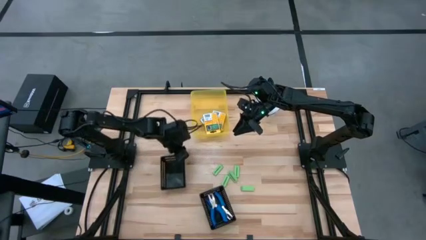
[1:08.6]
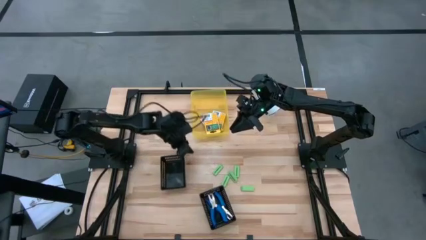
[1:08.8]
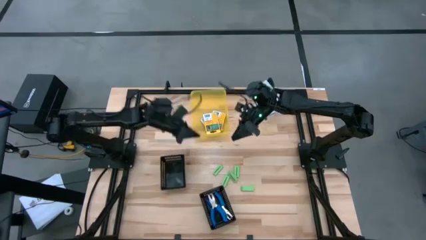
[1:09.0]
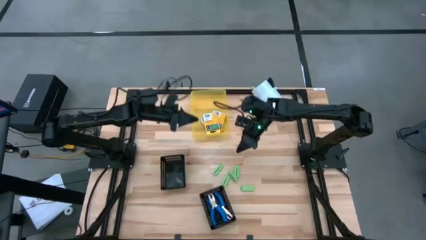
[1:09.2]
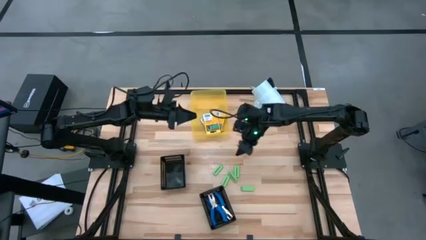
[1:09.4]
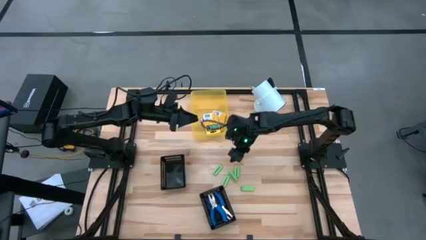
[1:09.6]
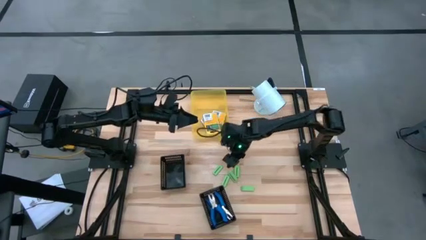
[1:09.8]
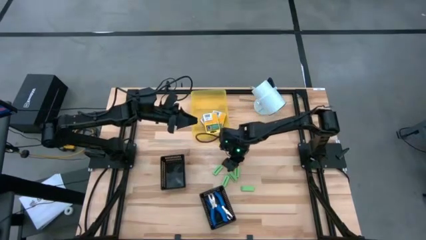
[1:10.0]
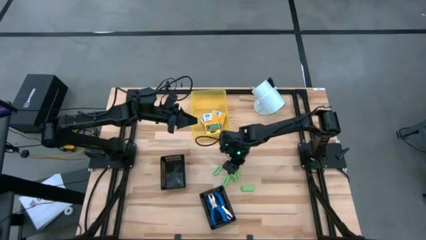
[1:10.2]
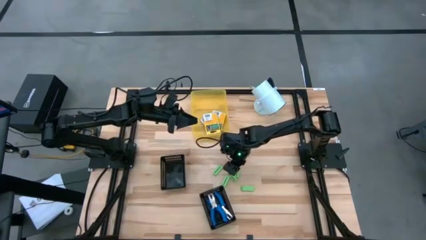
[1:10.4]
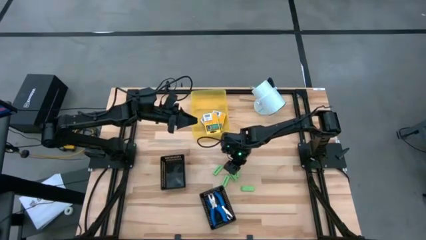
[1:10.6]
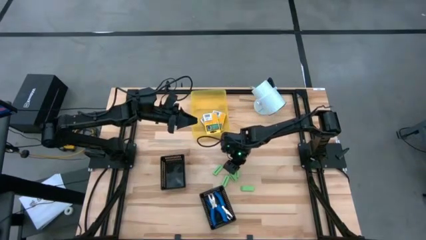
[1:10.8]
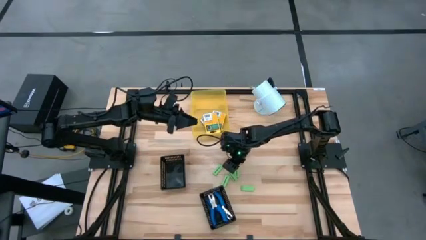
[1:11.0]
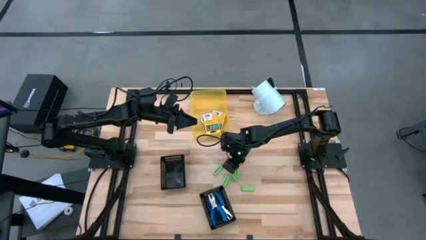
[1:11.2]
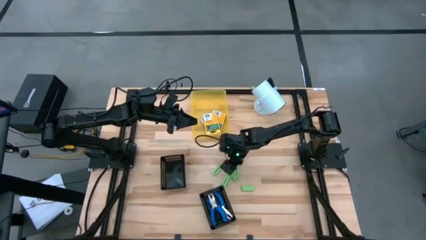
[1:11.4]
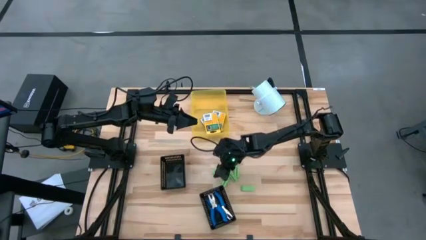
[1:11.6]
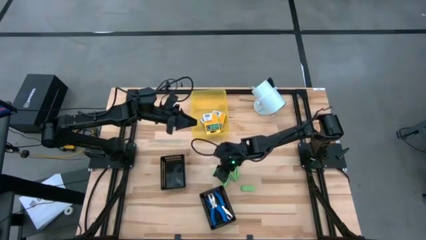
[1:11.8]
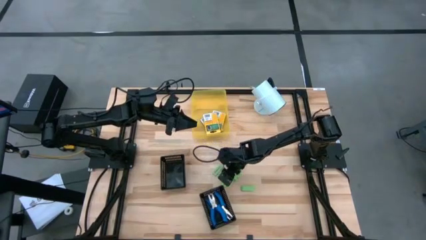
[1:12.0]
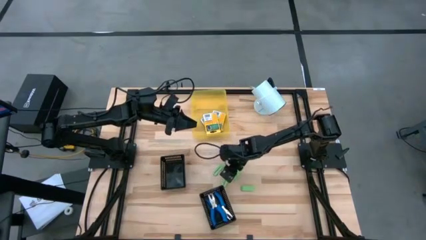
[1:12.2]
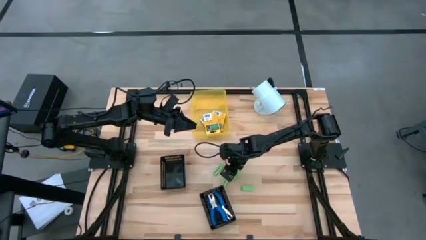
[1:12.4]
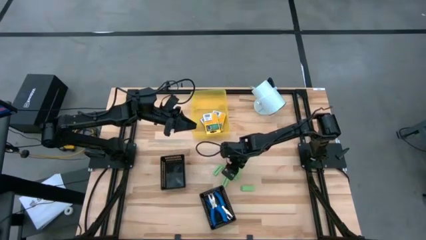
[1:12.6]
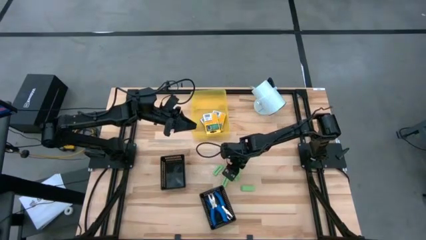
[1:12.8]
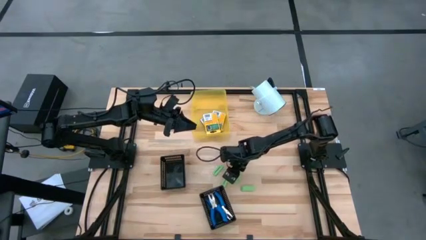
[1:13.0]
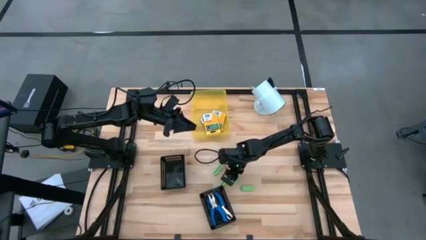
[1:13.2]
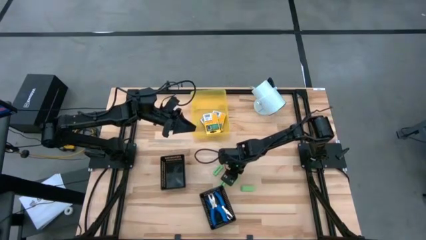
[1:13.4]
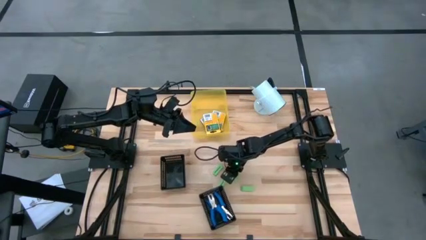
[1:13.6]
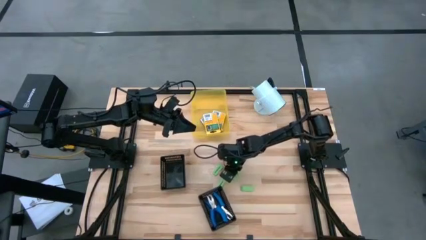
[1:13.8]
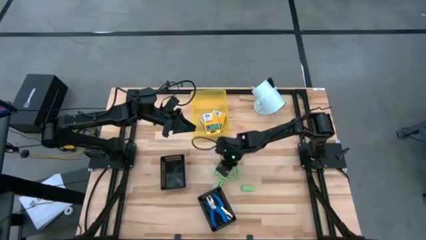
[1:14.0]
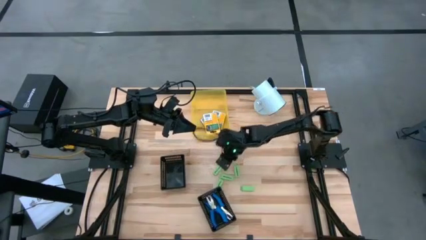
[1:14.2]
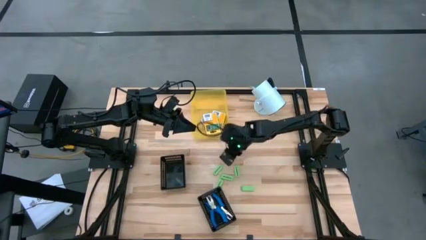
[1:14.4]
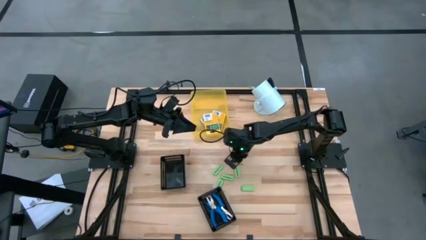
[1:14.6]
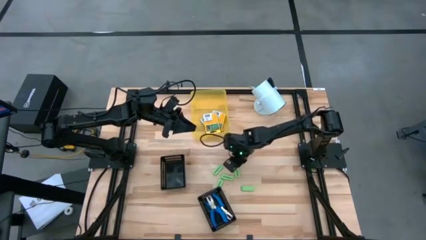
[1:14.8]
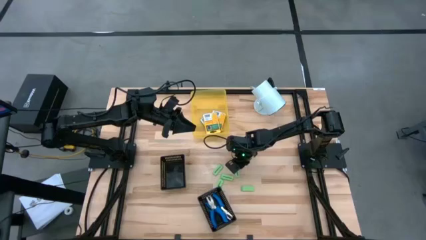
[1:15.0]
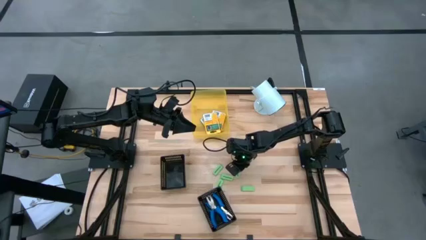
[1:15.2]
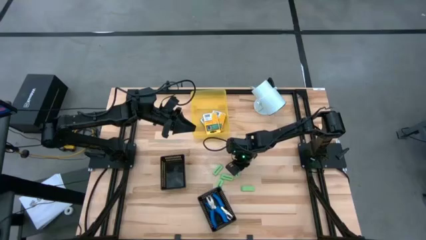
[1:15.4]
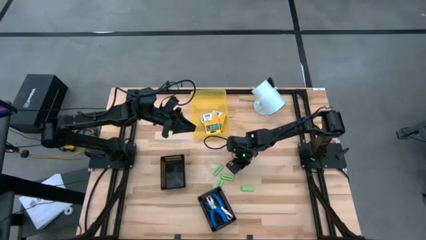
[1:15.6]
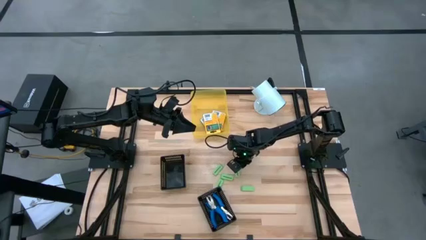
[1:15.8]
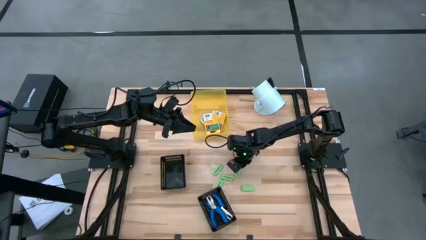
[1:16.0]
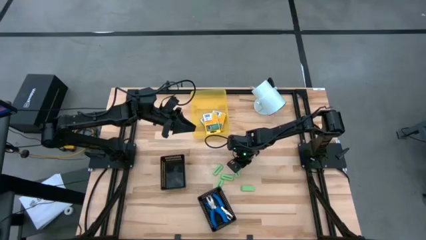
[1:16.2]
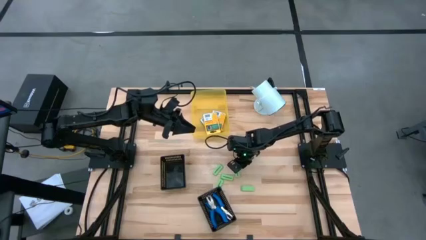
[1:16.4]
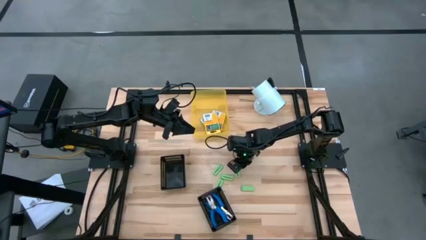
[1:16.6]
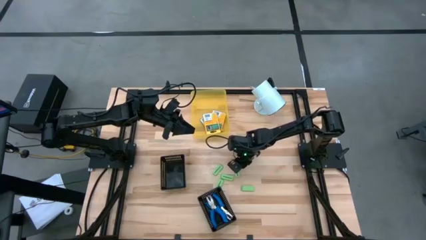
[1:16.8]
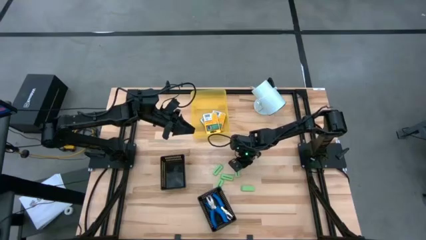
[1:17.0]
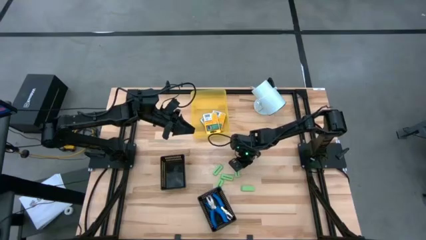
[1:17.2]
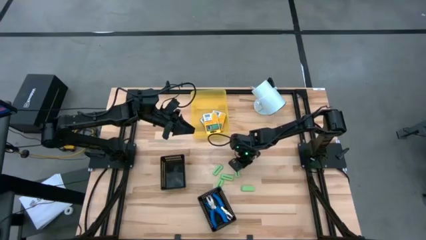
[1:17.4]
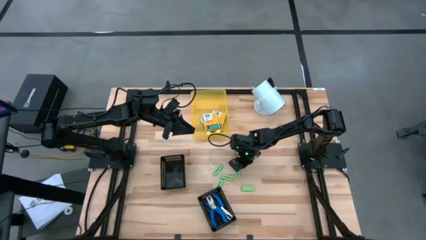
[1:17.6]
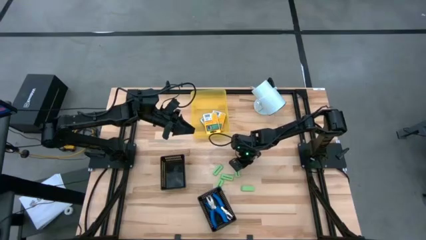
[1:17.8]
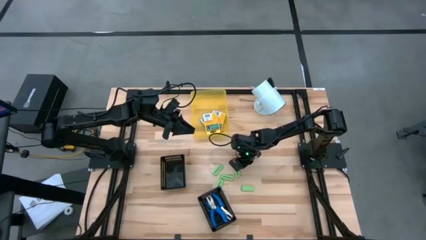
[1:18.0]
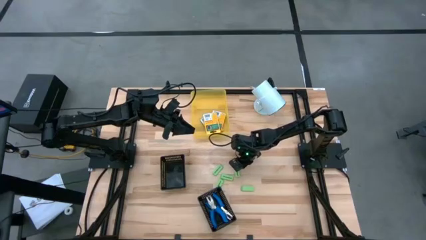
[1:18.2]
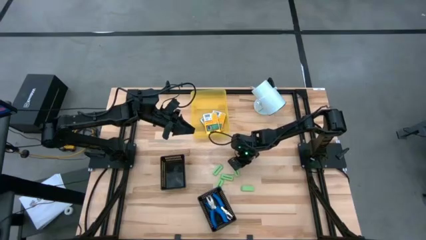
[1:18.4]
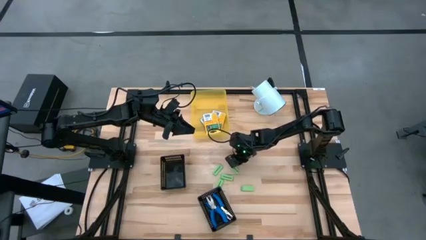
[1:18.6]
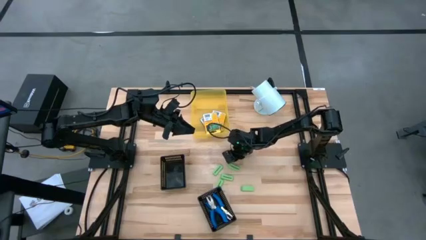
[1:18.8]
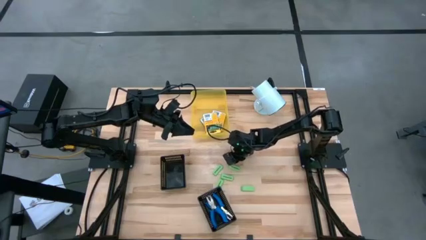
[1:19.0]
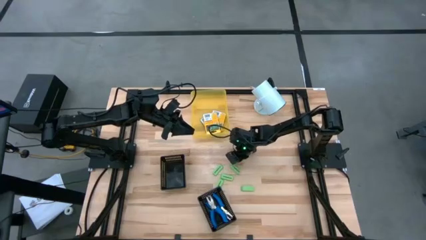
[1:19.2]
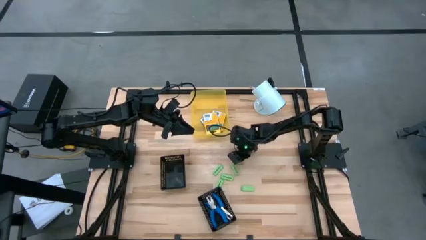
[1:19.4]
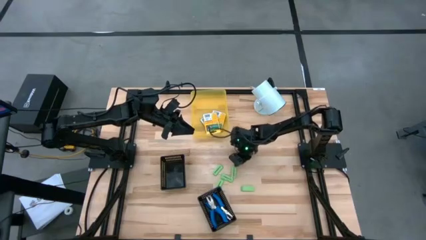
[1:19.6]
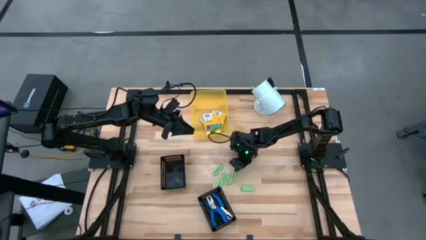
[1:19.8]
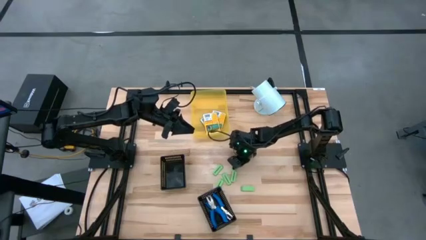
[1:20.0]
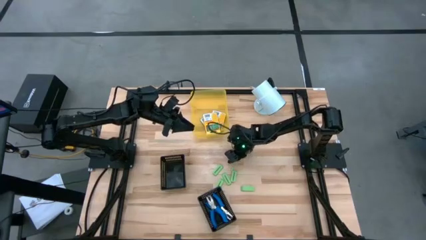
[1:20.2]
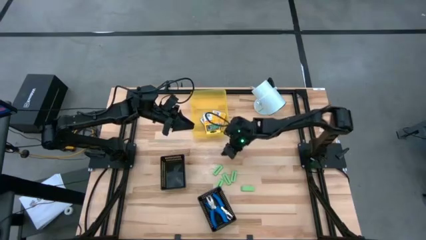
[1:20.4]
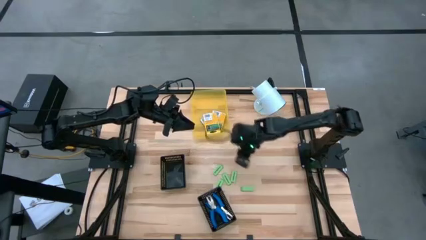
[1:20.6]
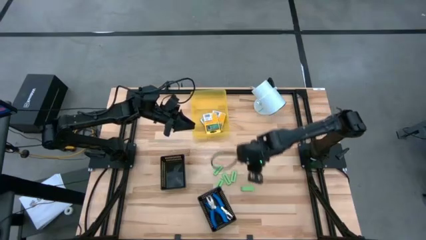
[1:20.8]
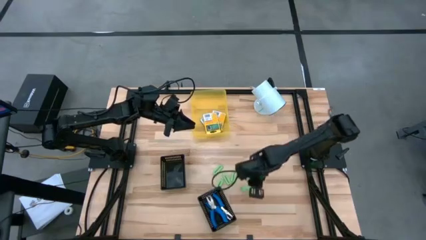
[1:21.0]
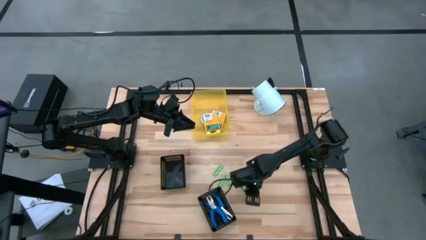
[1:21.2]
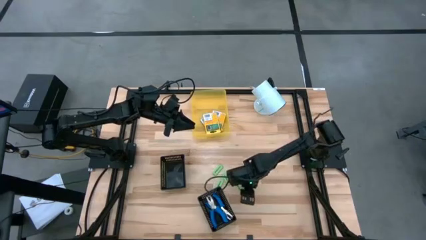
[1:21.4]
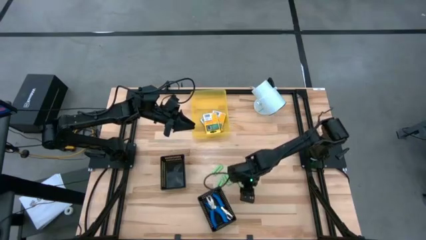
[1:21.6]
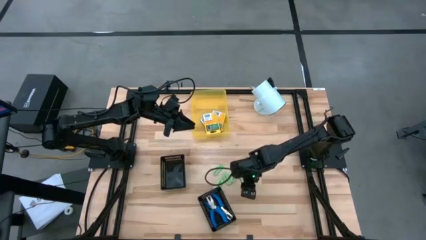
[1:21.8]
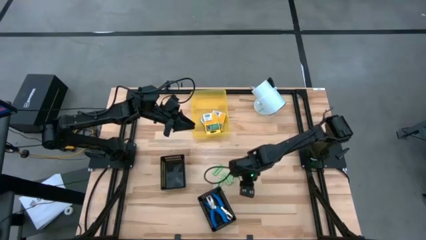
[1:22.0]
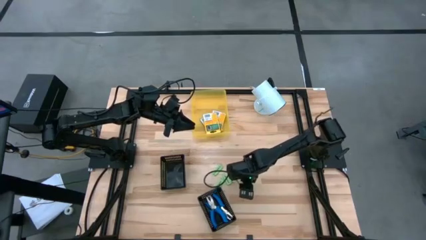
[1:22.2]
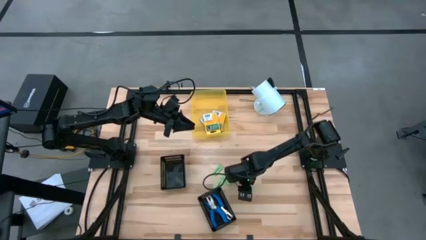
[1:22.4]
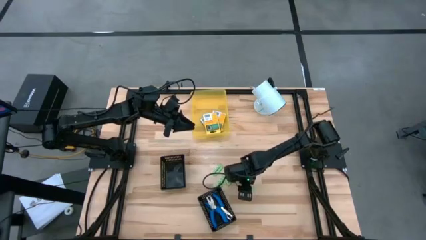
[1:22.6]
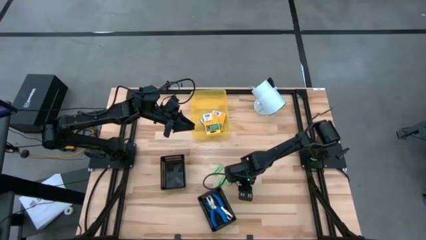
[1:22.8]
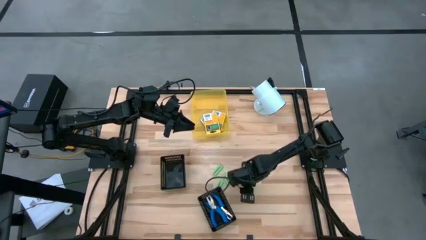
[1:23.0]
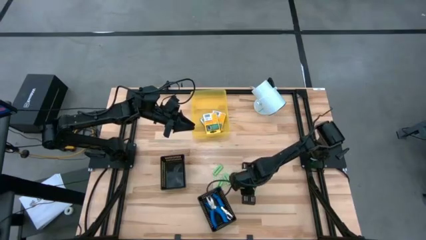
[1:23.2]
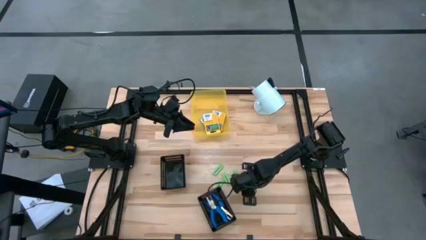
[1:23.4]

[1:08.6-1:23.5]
Task: Pick & Place School Supplies
Put the green eraser into the left black bin
